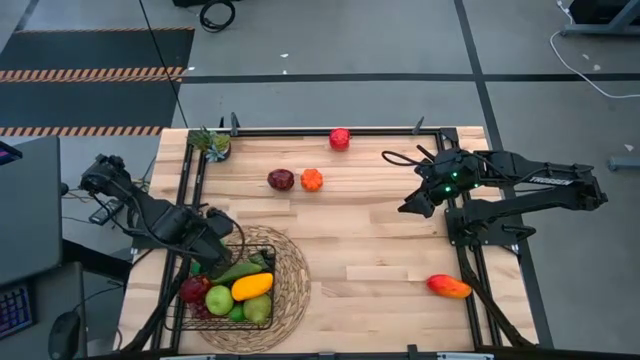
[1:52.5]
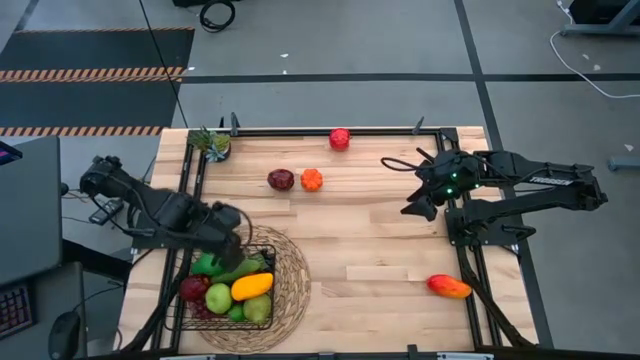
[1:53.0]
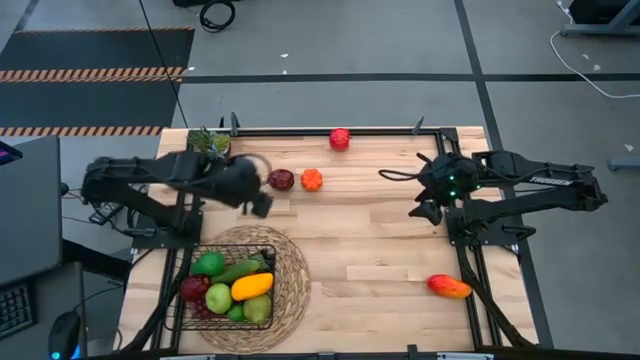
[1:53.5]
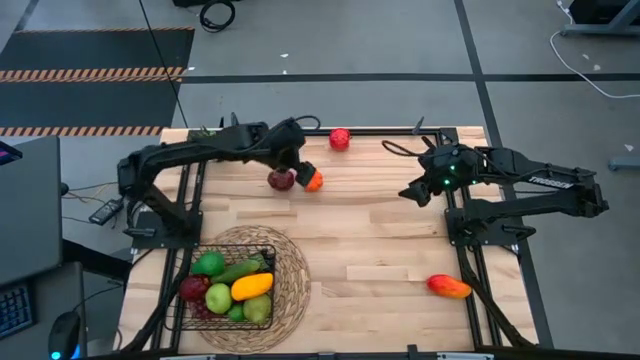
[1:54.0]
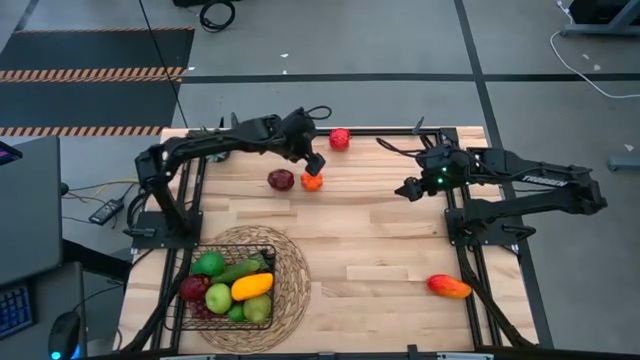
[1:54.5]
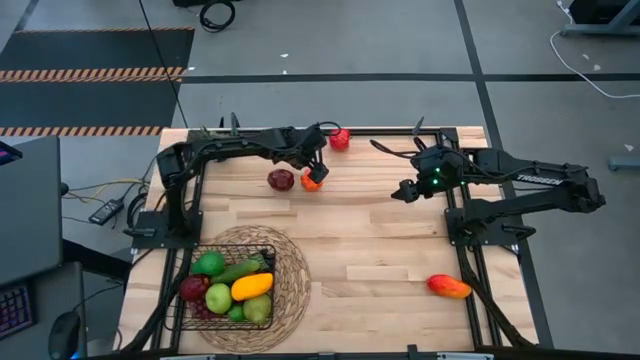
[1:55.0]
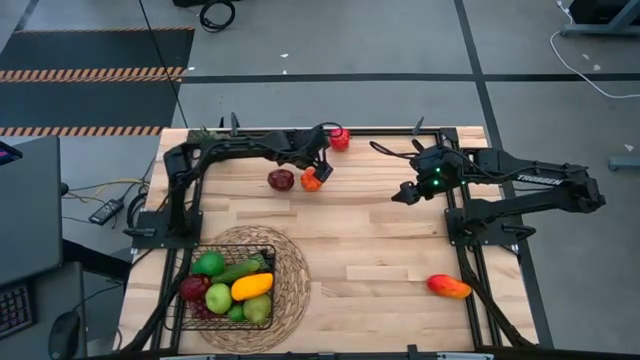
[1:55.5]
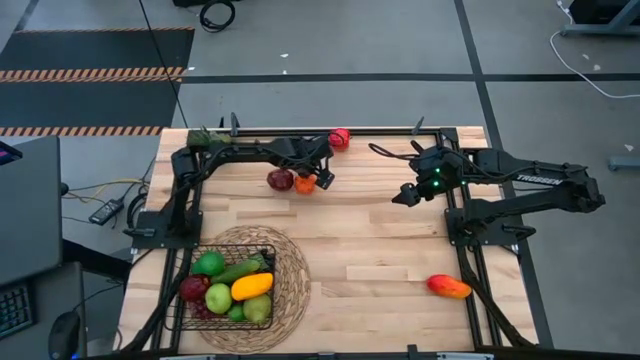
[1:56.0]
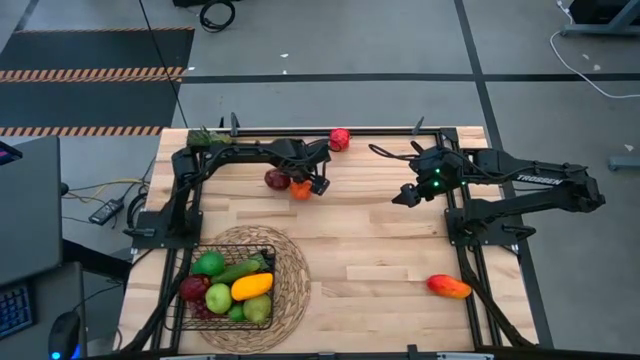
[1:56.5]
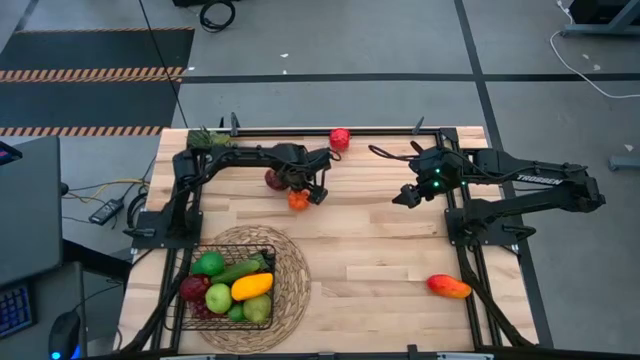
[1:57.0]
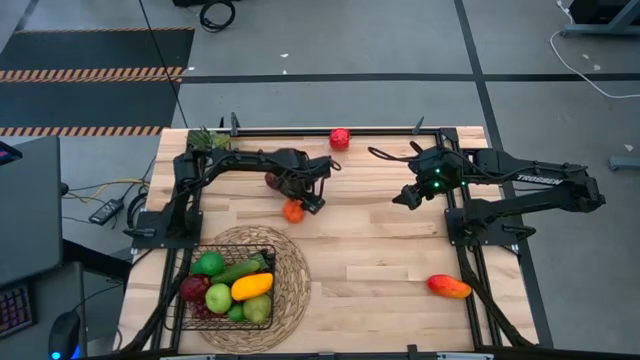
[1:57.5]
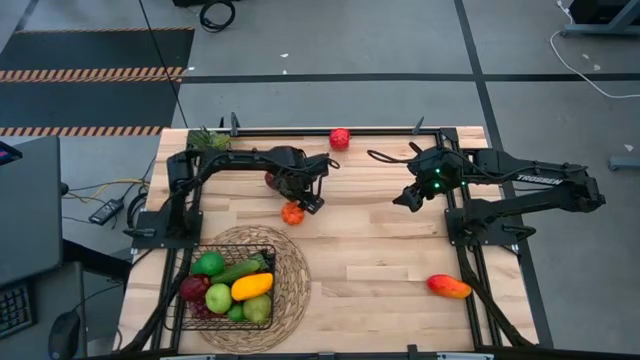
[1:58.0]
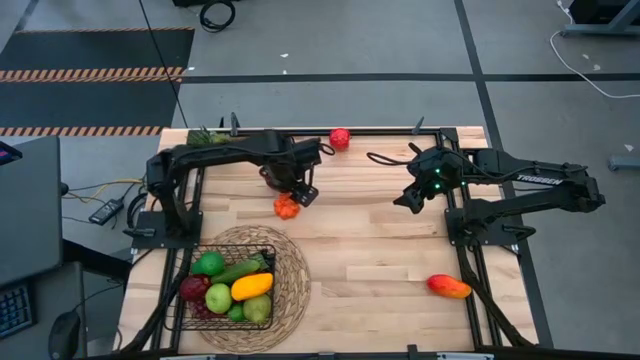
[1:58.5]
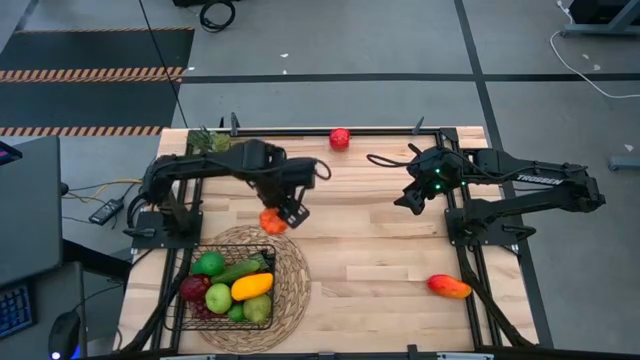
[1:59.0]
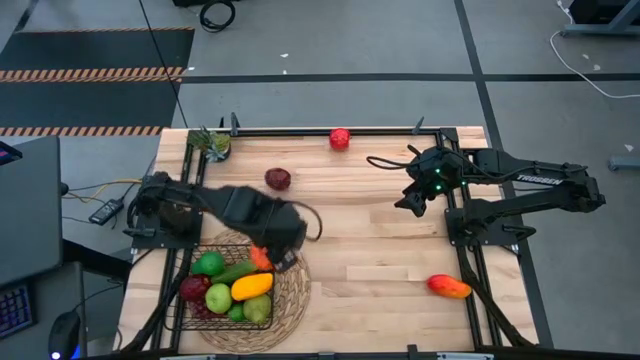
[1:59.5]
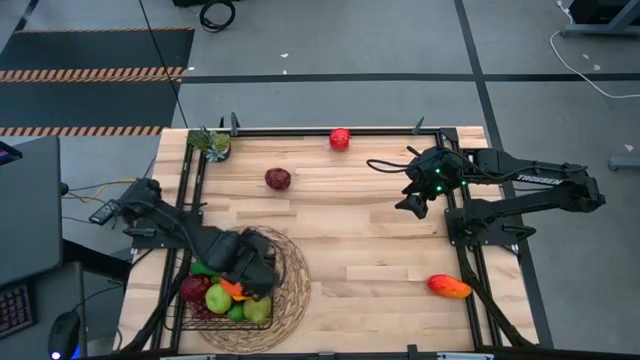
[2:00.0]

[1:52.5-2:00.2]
Task: Build produce basket
Put the squash into the black wire basket

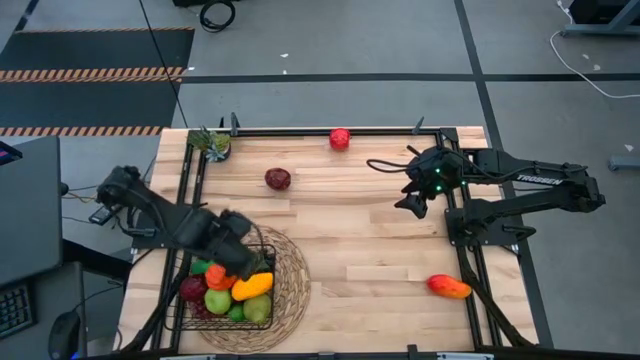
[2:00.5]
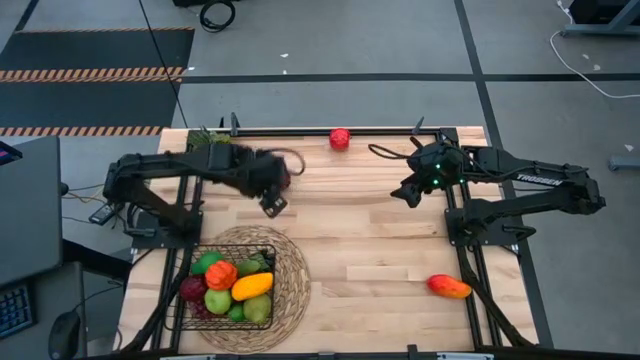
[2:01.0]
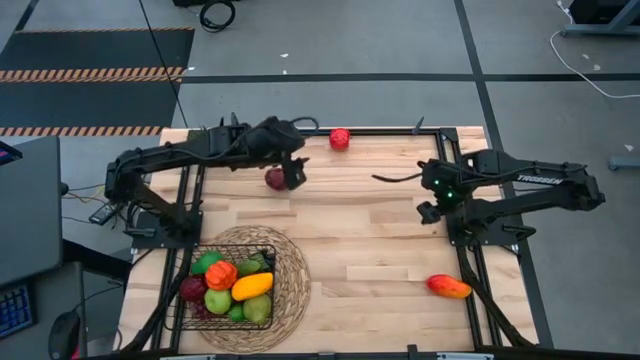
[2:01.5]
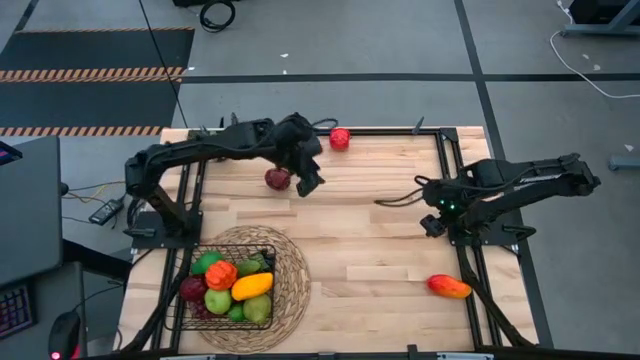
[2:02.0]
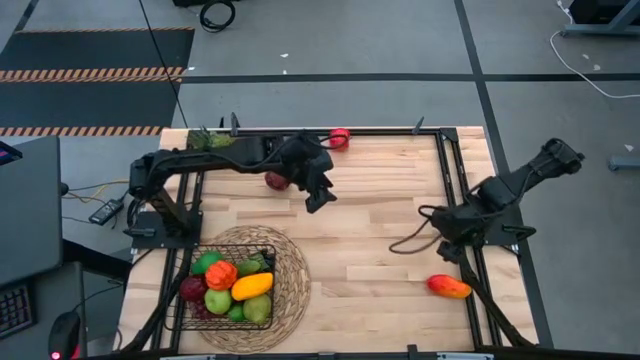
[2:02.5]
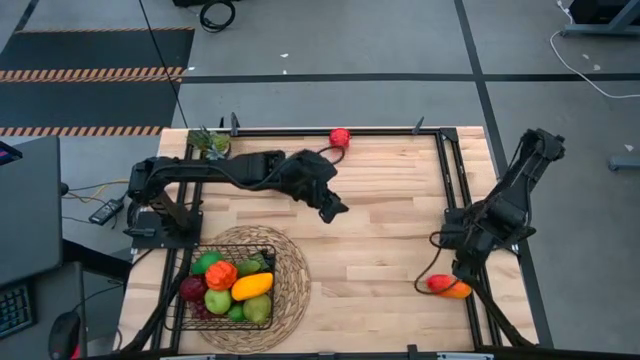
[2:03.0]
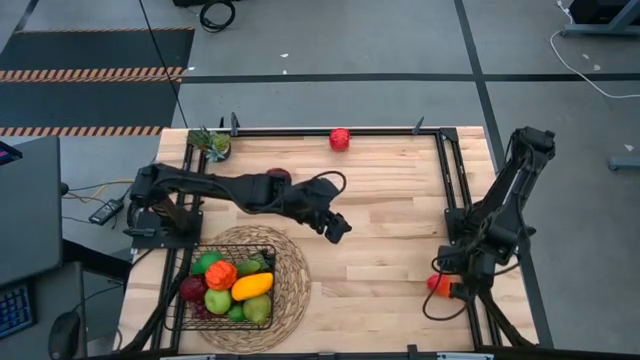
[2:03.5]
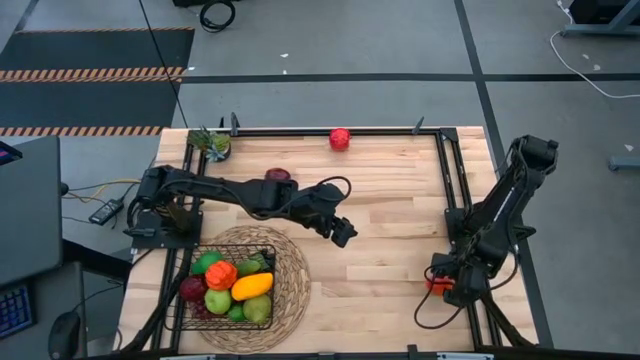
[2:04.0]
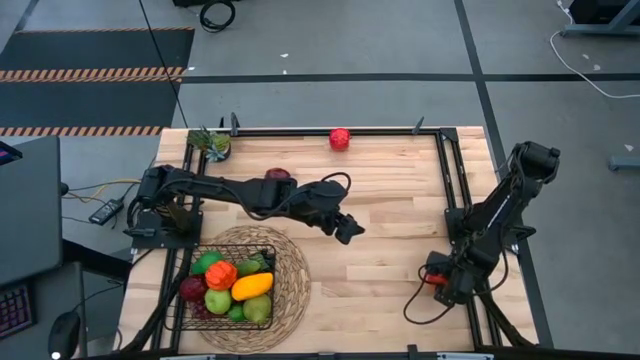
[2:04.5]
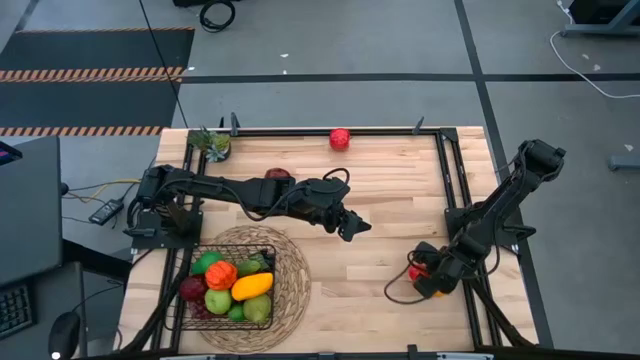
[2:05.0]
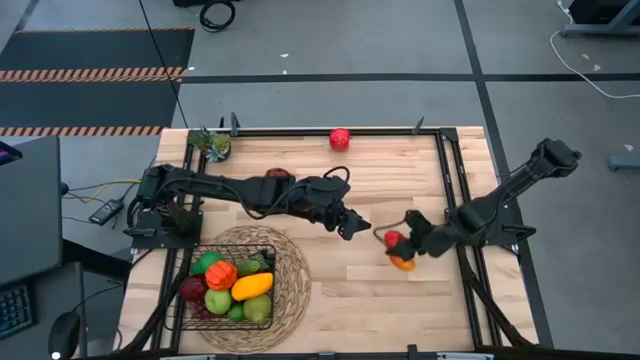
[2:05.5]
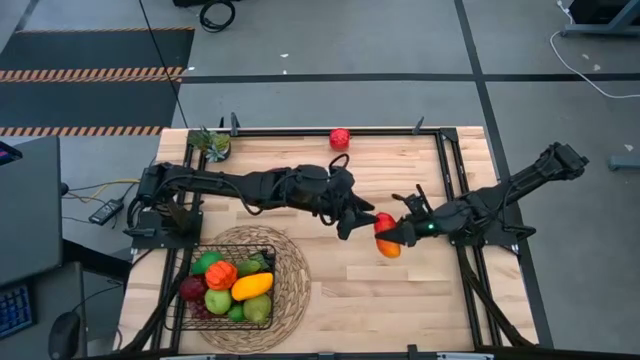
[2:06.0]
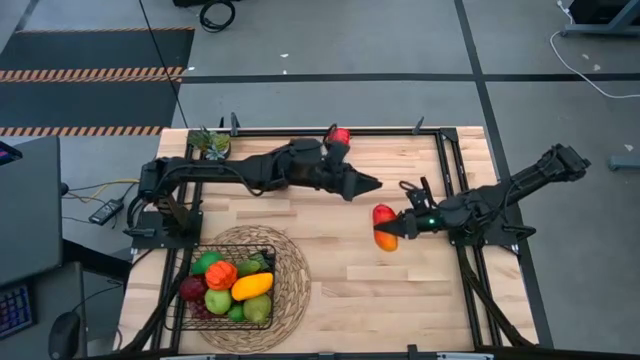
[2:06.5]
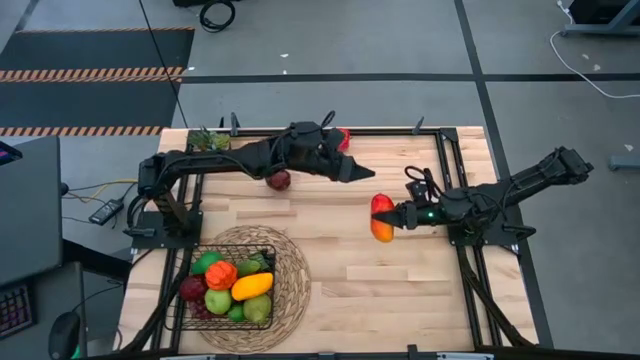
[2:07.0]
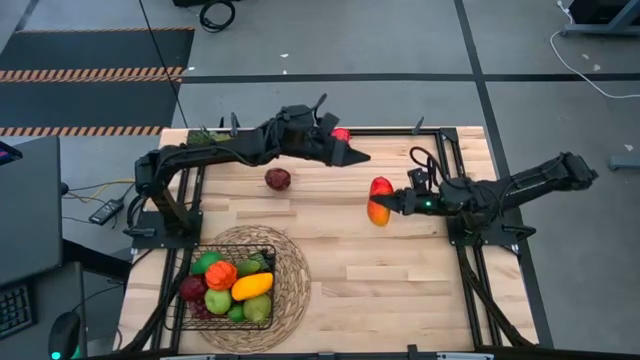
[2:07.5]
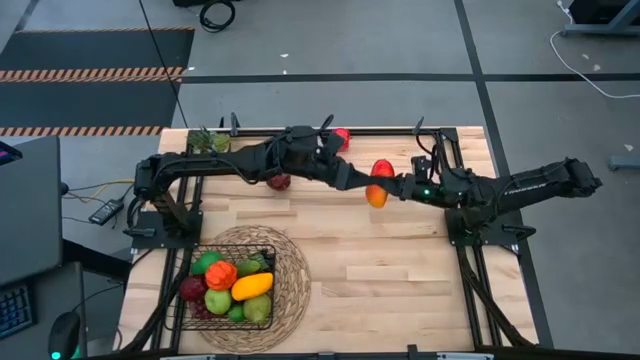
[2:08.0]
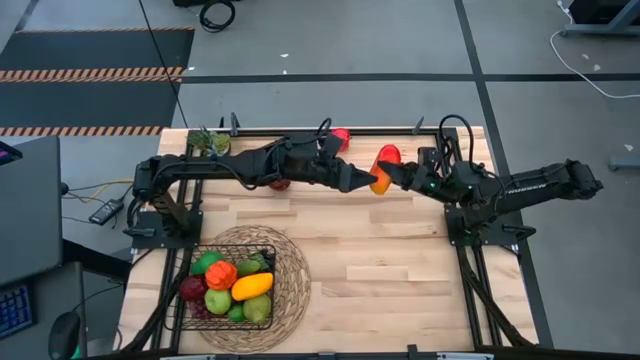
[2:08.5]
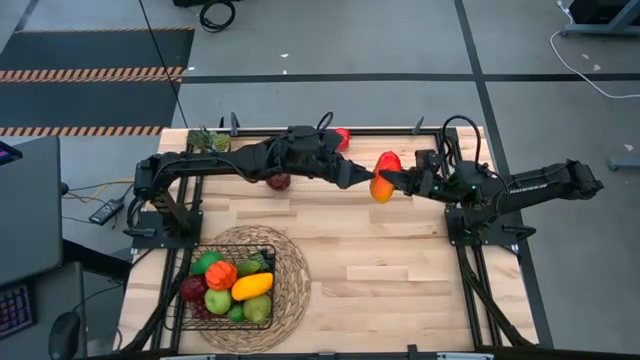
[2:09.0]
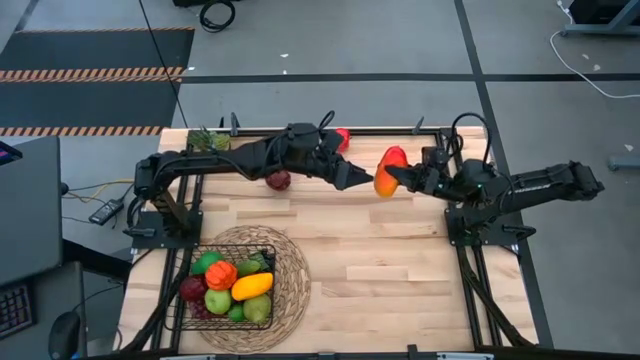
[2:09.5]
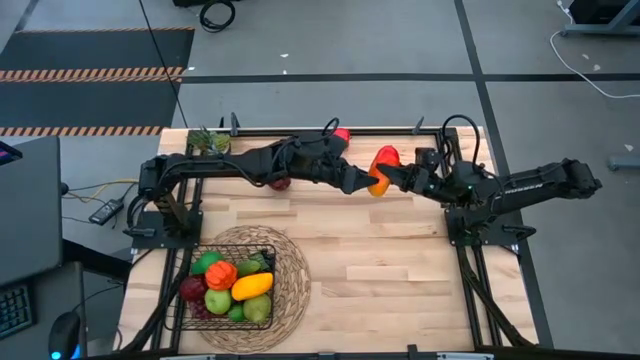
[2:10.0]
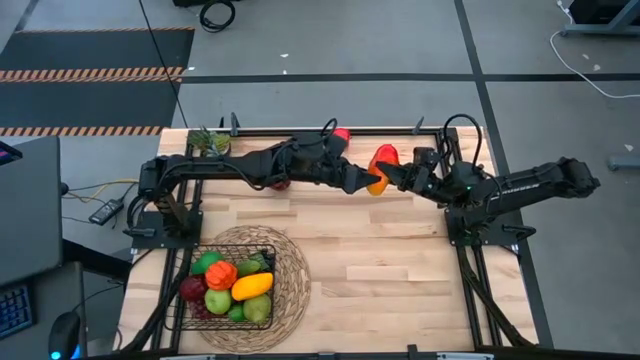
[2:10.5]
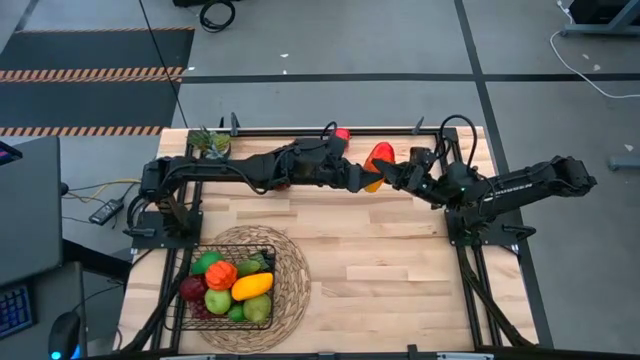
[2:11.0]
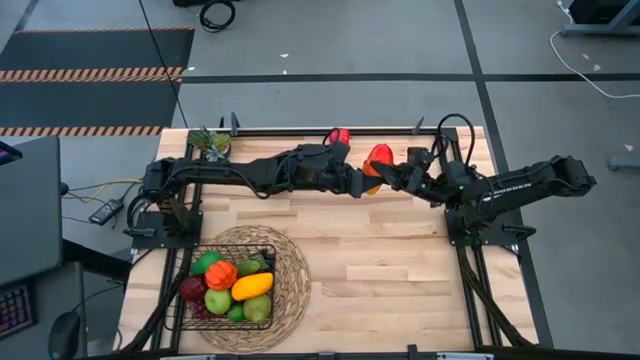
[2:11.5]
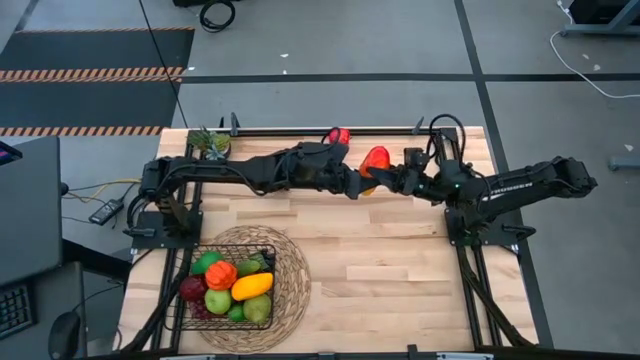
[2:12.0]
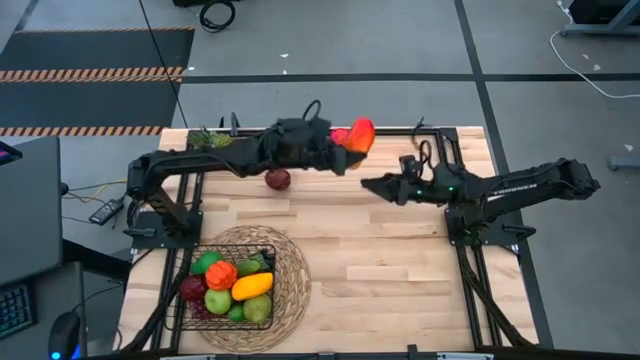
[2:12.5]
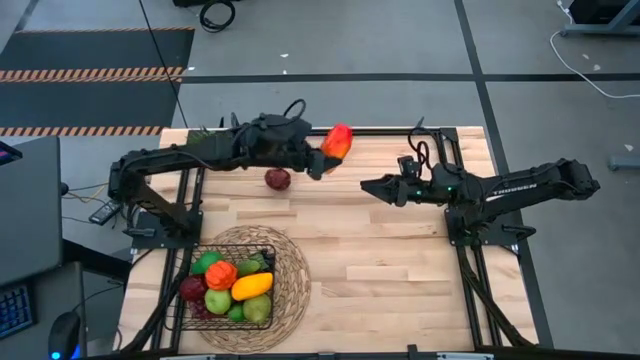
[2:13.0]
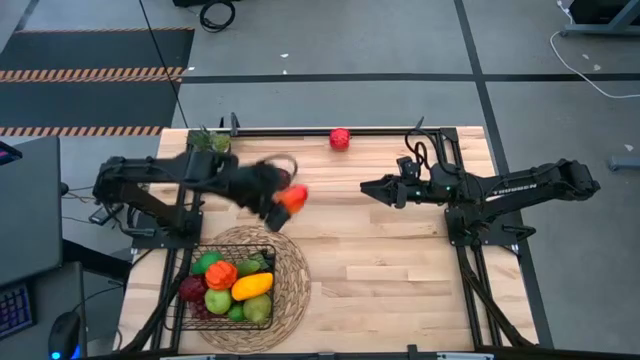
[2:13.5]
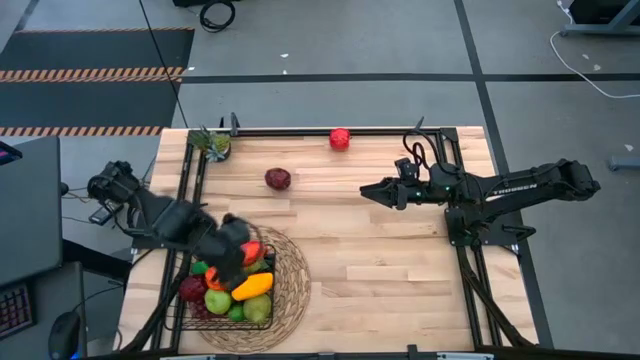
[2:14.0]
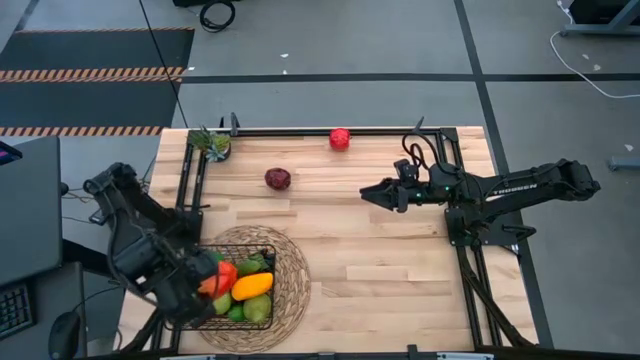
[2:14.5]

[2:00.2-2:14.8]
Put the red mango into the black wire basket
